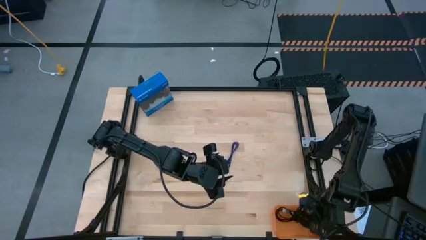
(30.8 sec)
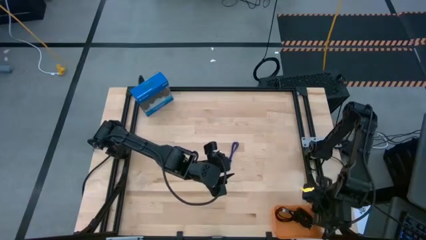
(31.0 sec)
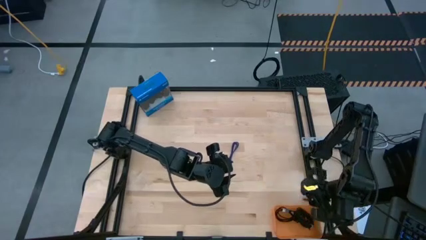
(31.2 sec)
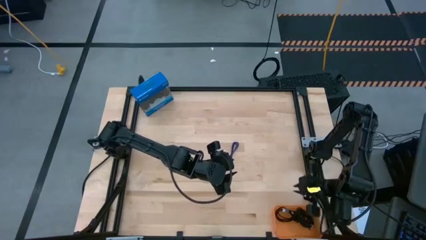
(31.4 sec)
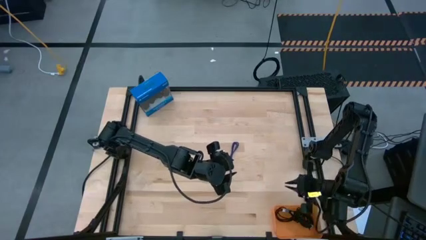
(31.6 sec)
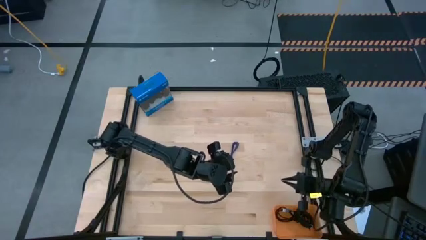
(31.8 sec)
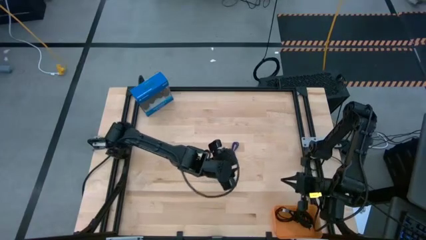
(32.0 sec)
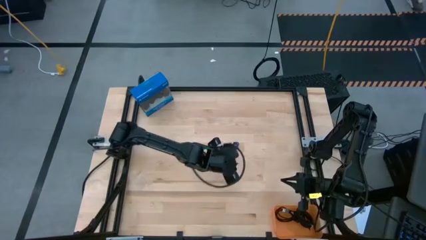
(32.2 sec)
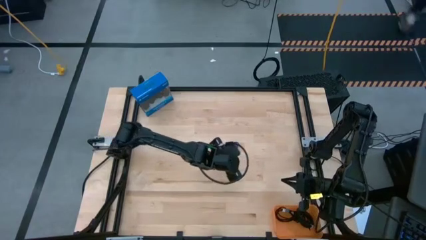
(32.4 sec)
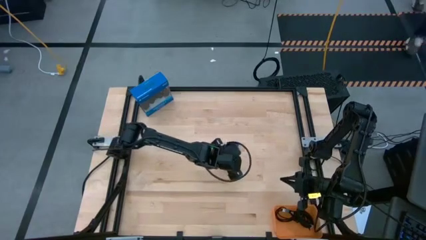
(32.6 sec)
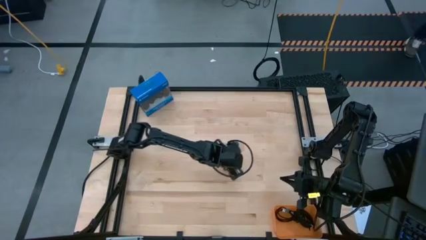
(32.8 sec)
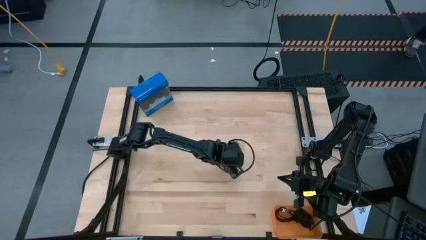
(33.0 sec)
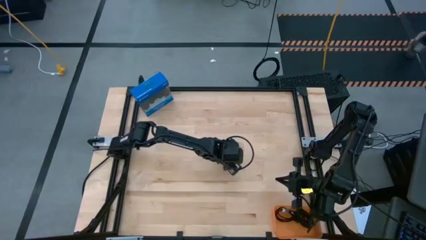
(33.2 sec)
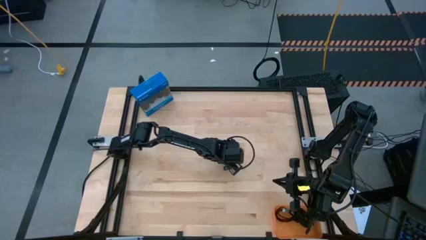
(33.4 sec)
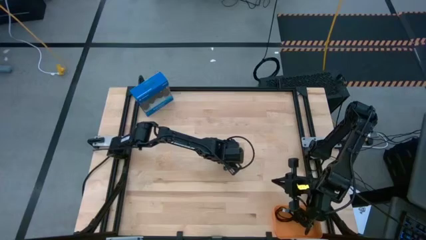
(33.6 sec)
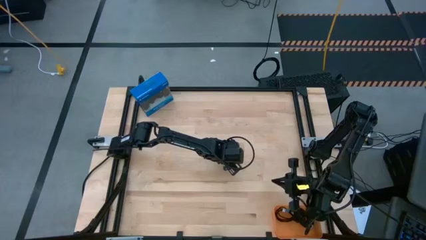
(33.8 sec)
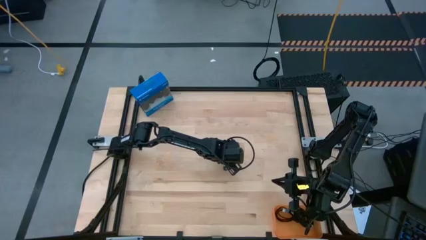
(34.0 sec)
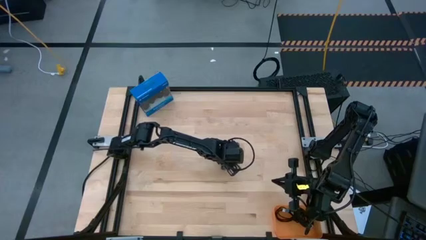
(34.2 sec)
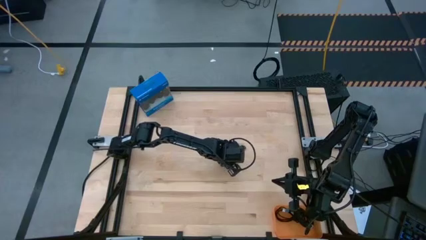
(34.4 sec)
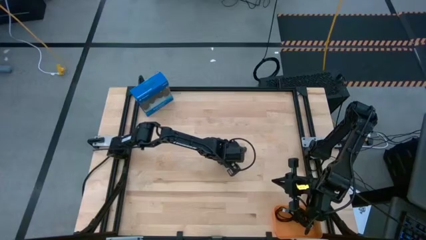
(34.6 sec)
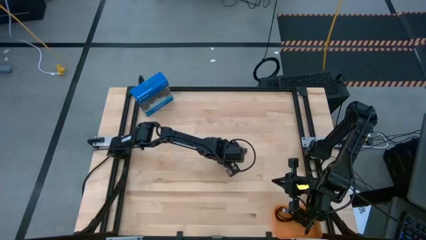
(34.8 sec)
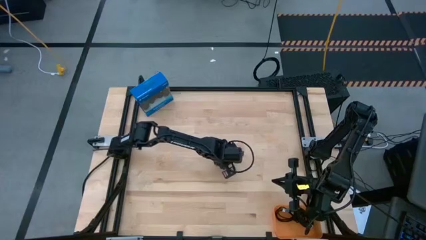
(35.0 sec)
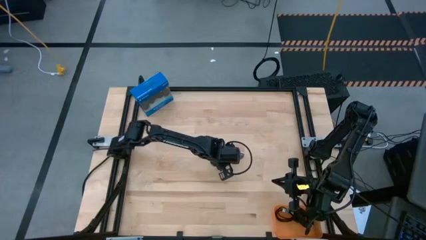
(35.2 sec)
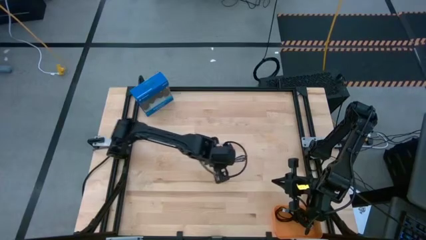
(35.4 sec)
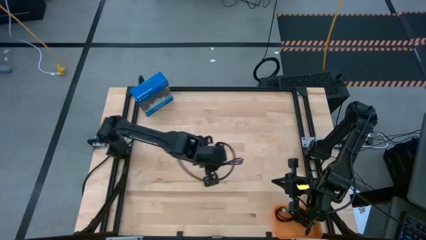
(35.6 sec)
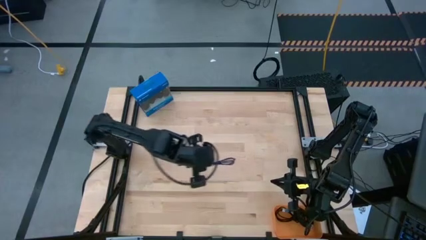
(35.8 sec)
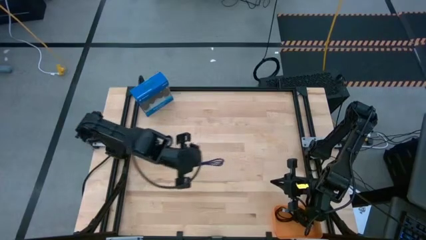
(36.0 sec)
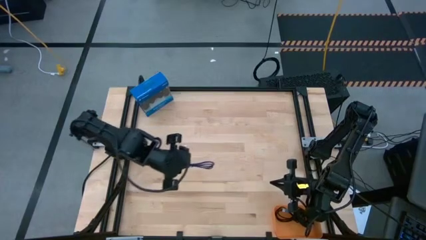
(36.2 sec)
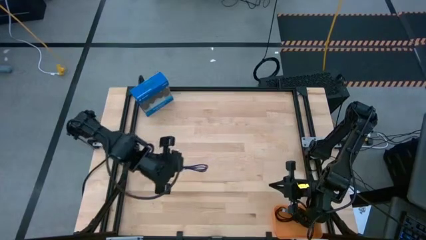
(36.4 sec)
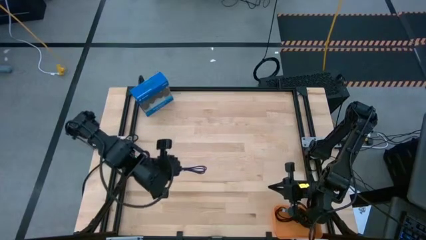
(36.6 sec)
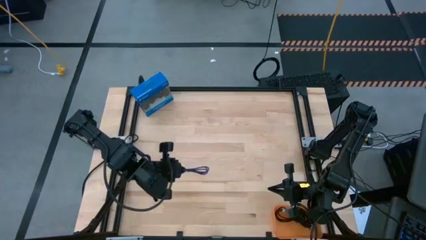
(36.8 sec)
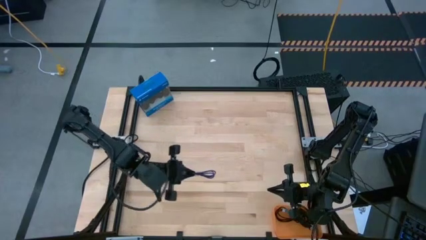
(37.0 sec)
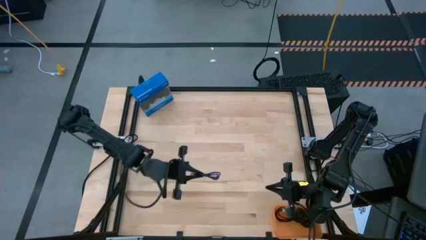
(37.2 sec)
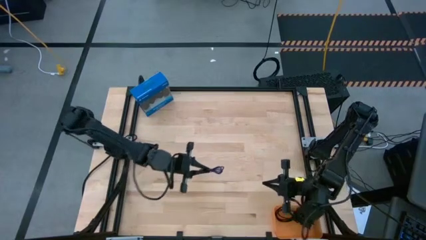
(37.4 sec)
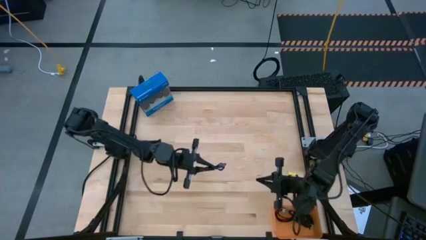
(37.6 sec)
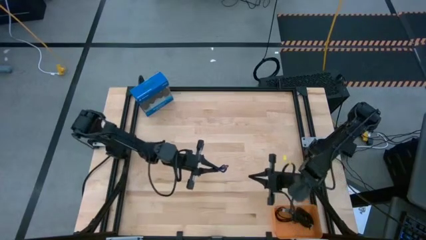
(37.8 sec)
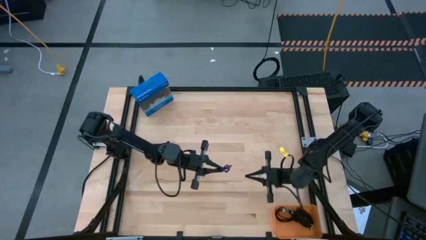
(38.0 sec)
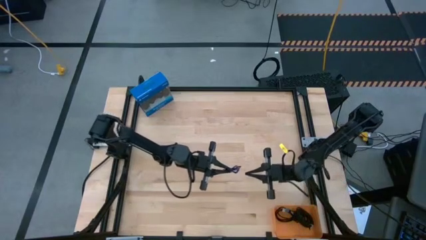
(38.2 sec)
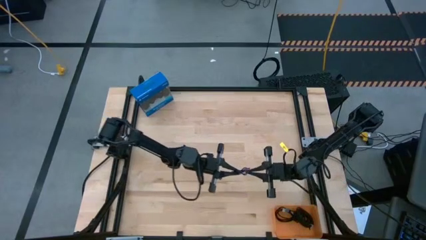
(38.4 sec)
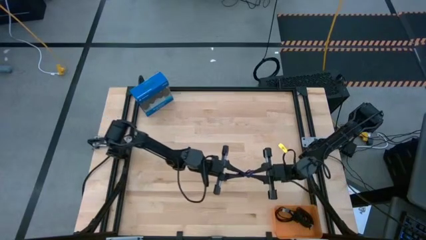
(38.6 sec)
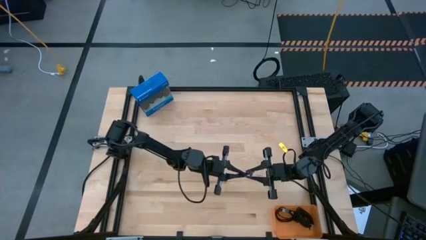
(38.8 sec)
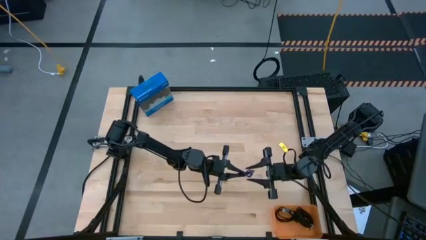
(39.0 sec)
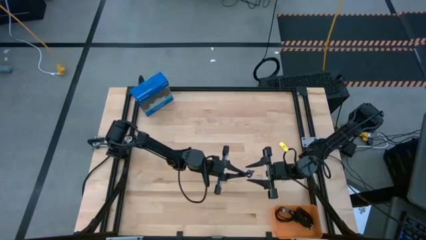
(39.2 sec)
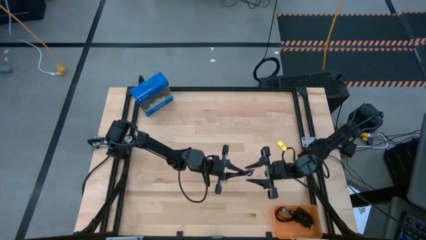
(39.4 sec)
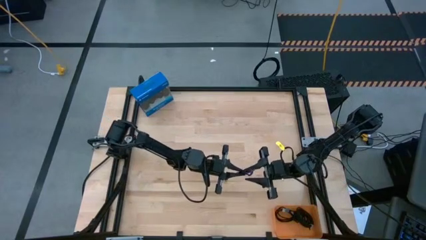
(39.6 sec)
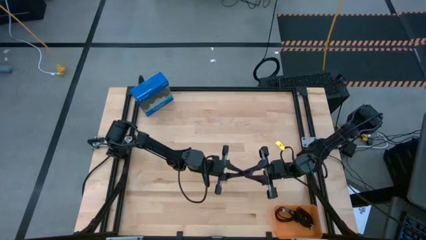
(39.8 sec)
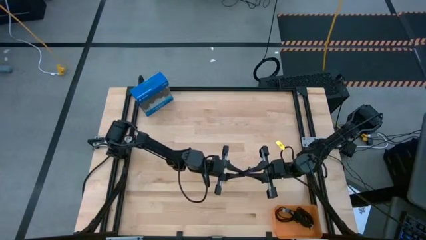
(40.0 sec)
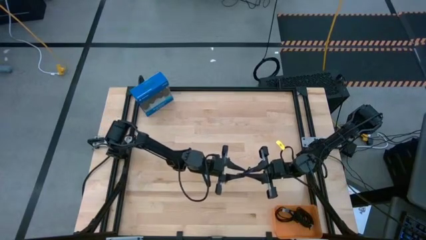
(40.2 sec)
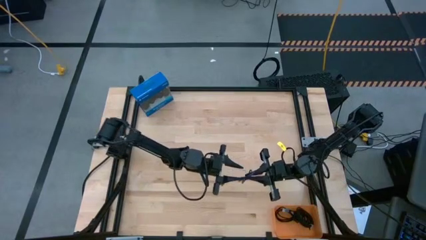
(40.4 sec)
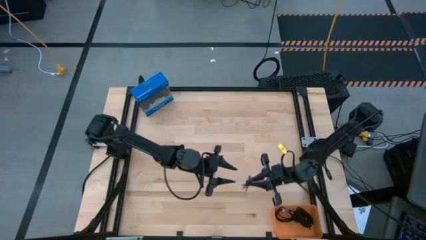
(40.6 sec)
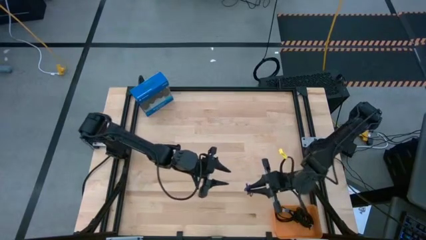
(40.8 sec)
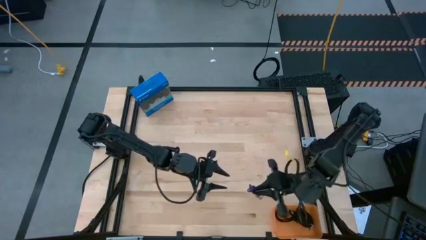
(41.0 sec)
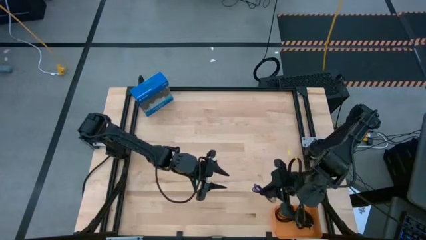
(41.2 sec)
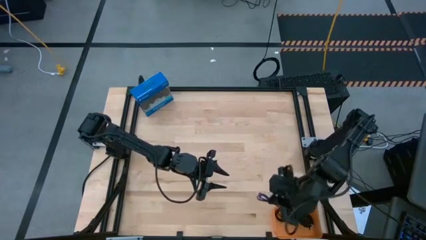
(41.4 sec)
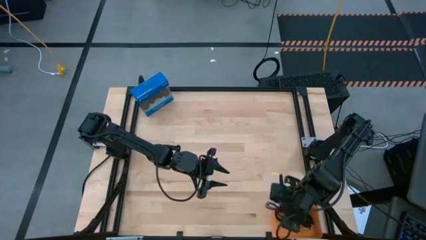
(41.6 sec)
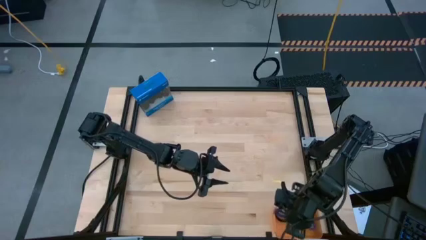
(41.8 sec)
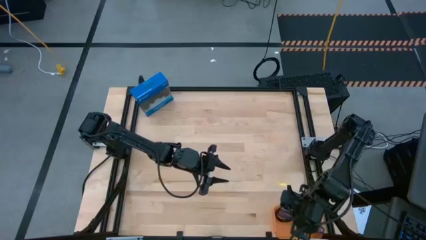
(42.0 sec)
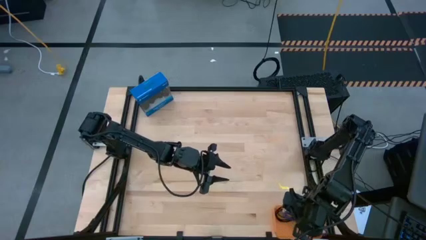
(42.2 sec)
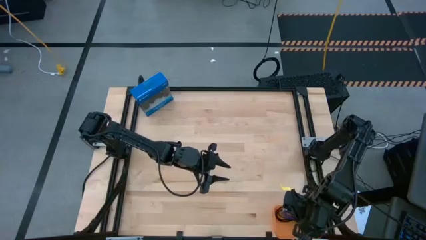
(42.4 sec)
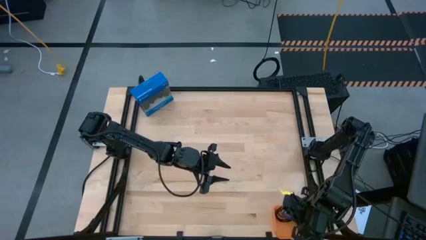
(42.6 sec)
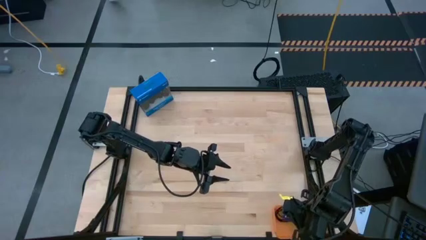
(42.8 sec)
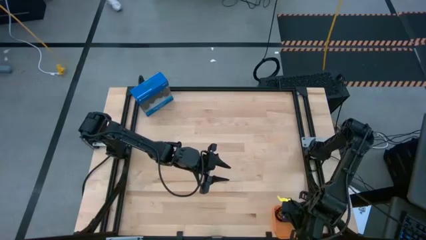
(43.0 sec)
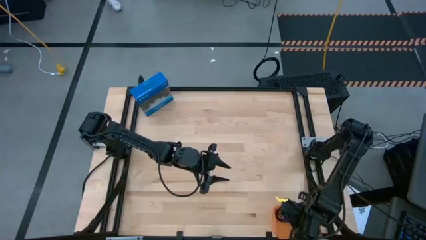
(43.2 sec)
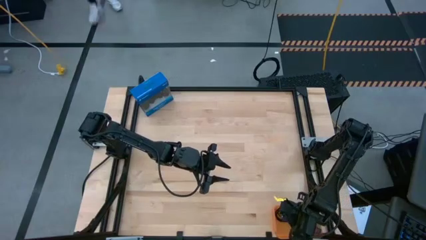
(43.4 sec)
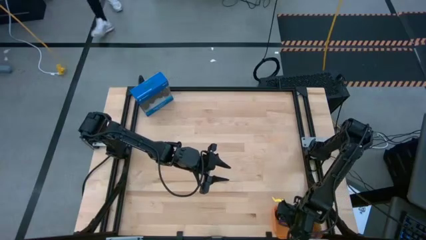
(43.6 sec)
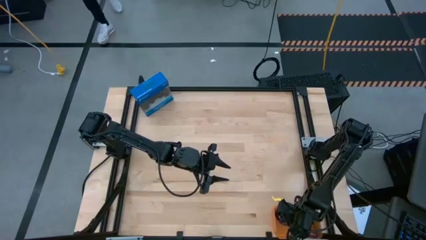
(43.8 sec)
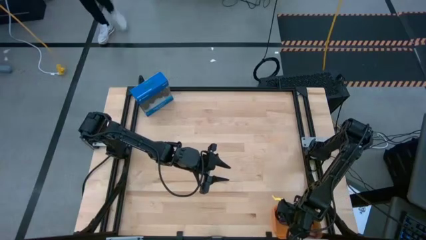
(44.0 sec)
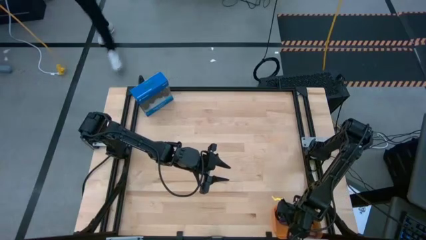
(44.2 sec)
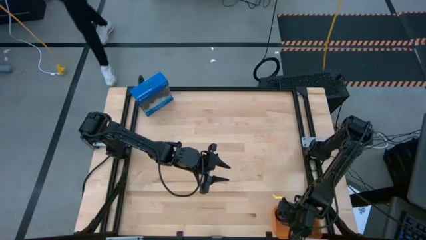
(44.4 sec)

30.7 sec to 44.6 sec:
Task: Pick and place USB-C Cables
Put the violet charger cable into the orange bin

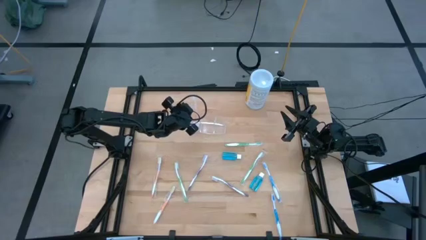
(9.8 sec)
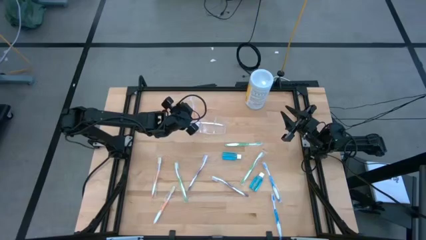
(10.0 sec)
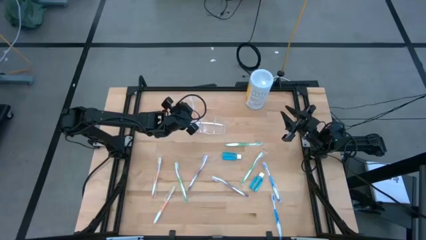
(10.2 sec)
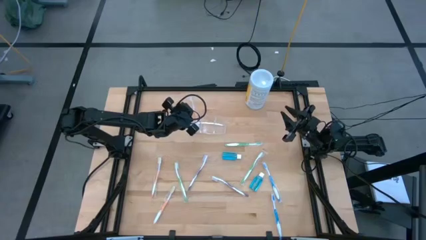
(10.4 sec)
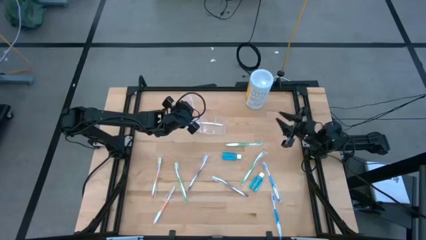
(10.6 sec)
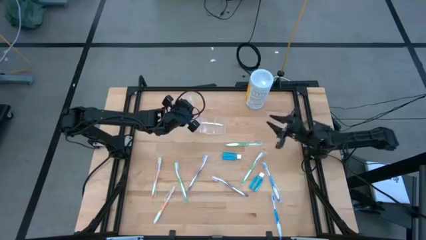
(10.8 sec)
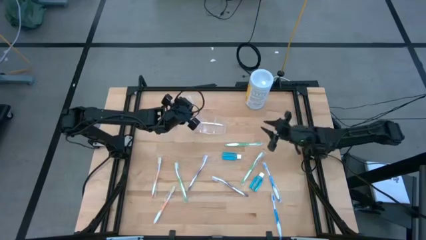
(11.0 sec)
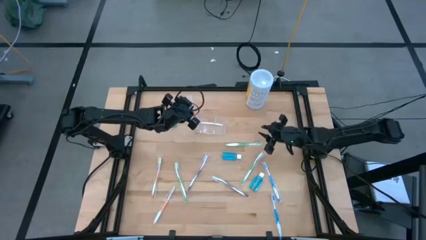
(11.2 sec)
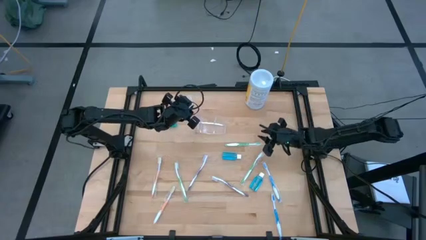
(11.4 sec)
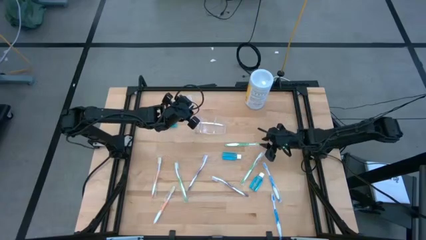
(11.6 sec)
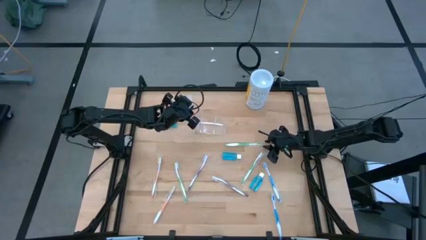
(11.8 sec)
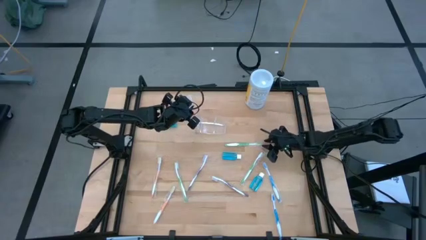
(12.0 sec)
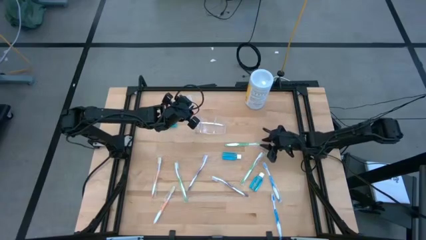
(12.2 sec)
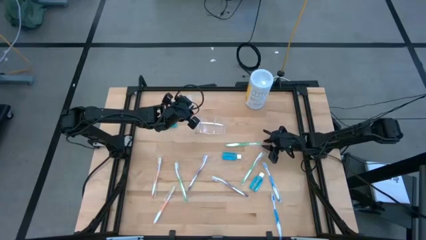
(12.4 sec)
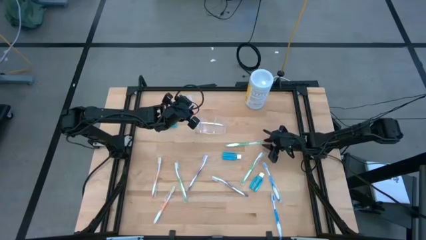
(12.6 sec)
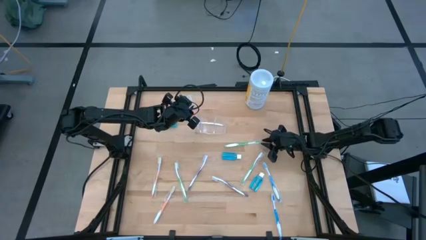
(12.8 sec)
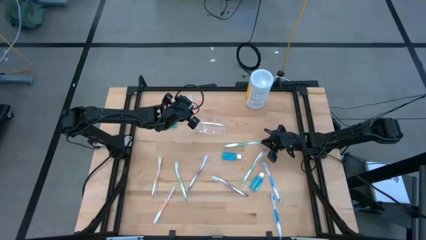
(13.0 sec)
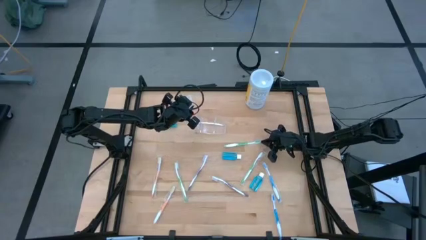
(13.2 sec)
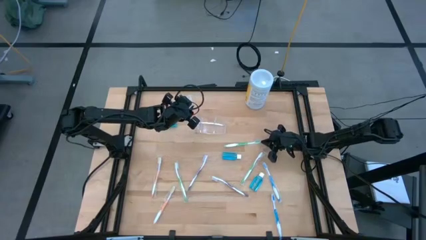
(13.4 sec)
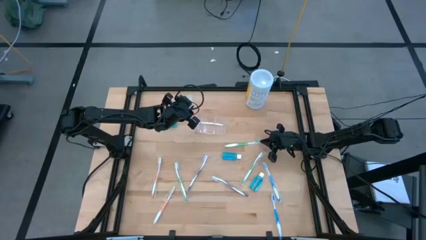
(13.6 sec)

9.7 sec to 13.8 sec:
Task: Pick & Place toothbrushing station
Put the top right green toothbrush into the transparent organizer
